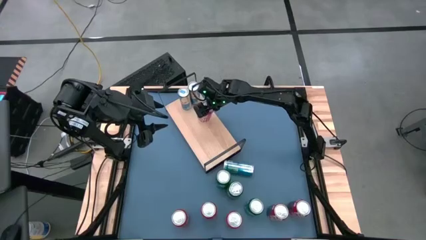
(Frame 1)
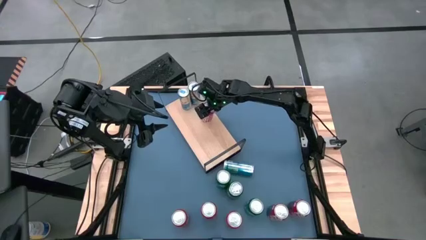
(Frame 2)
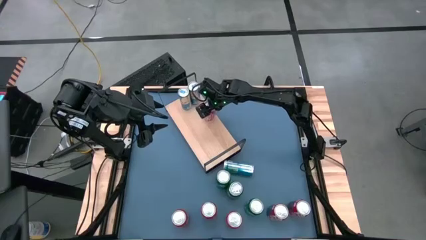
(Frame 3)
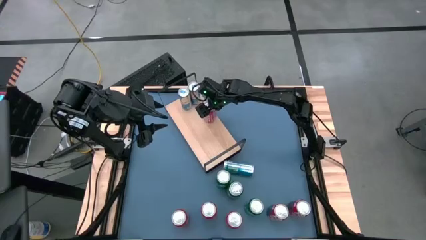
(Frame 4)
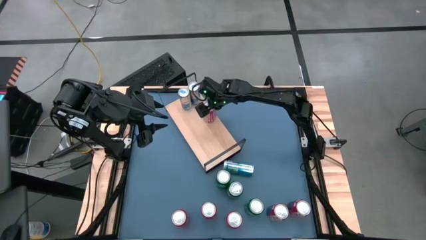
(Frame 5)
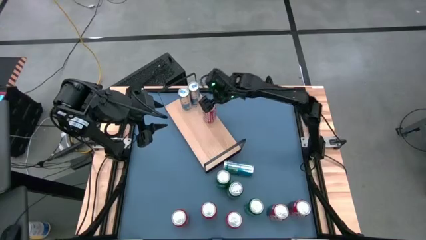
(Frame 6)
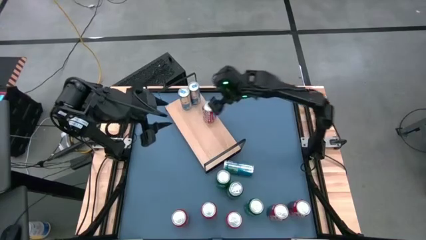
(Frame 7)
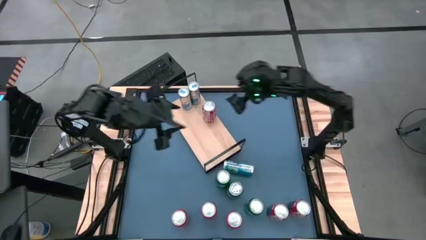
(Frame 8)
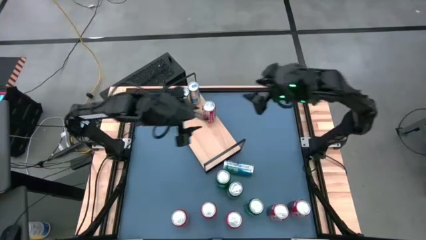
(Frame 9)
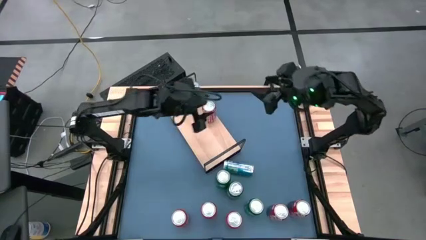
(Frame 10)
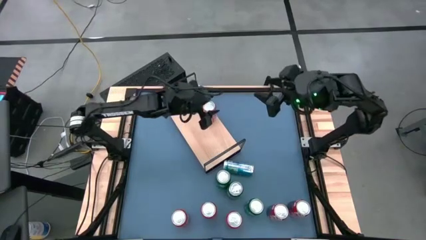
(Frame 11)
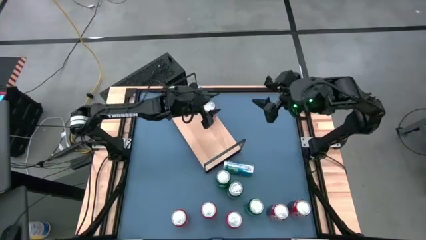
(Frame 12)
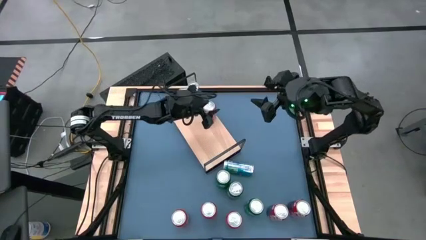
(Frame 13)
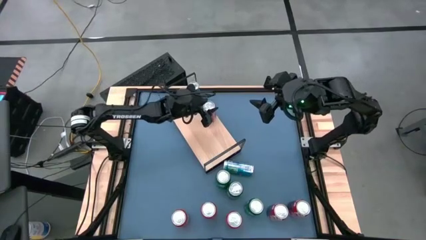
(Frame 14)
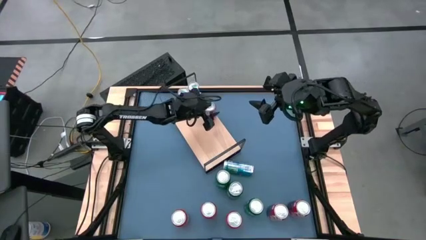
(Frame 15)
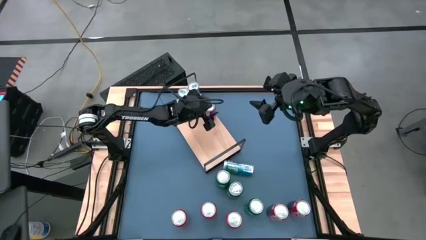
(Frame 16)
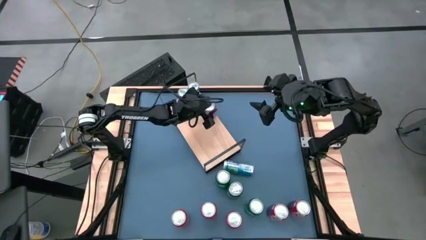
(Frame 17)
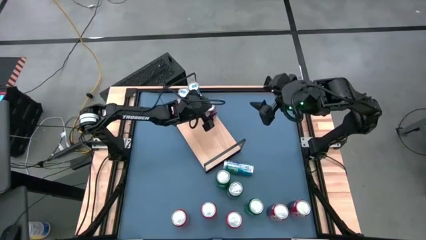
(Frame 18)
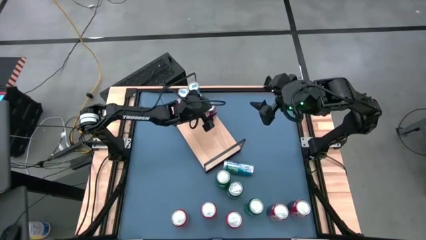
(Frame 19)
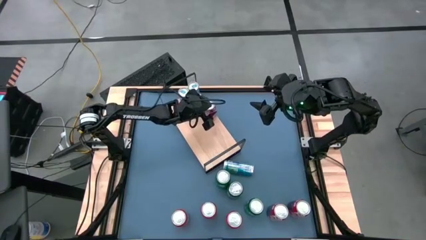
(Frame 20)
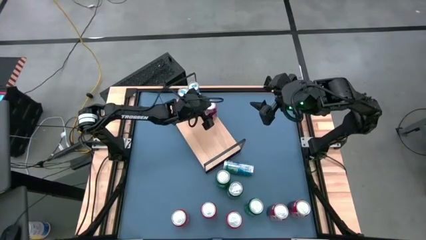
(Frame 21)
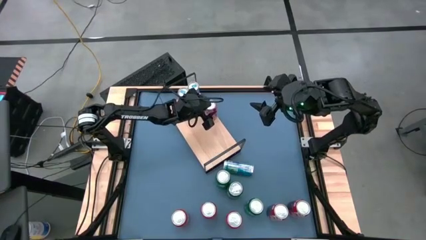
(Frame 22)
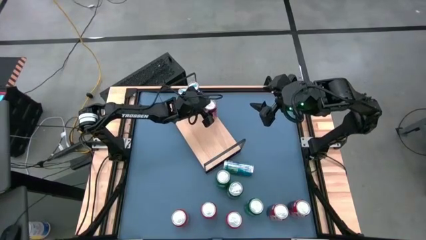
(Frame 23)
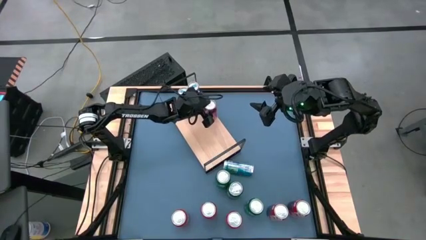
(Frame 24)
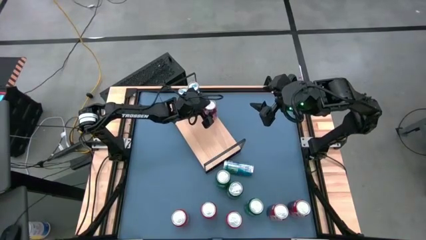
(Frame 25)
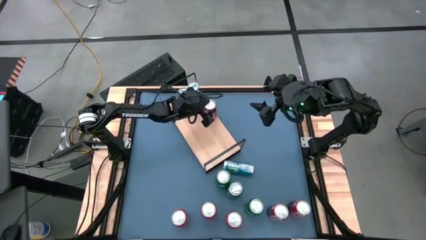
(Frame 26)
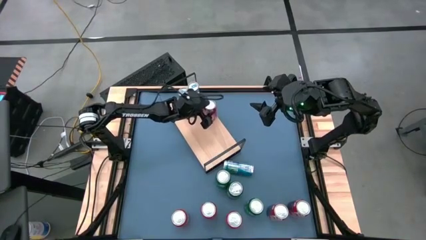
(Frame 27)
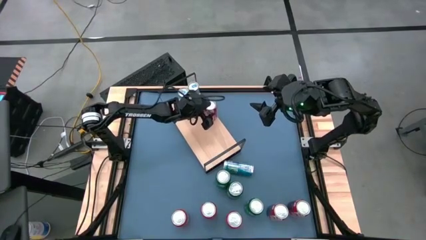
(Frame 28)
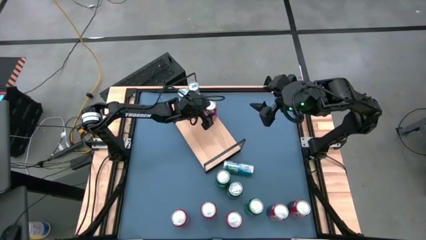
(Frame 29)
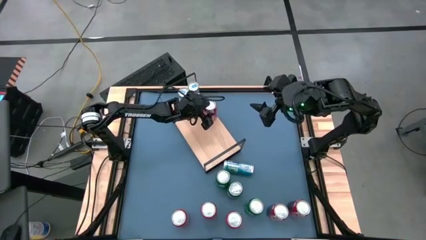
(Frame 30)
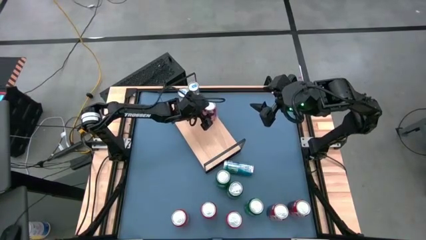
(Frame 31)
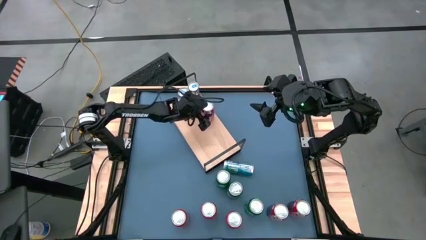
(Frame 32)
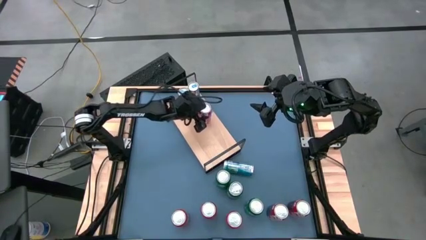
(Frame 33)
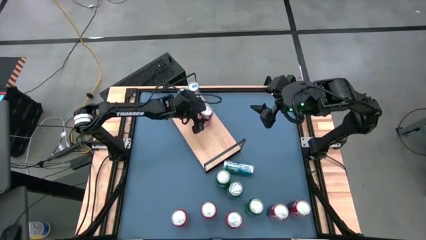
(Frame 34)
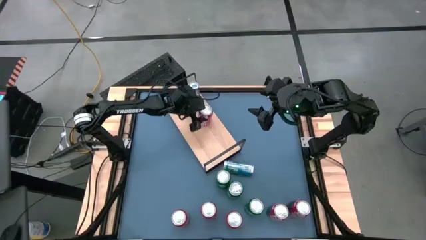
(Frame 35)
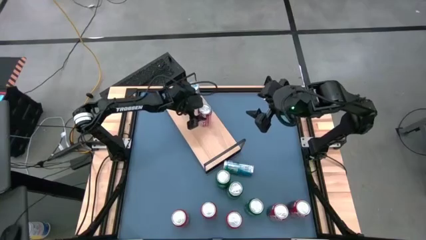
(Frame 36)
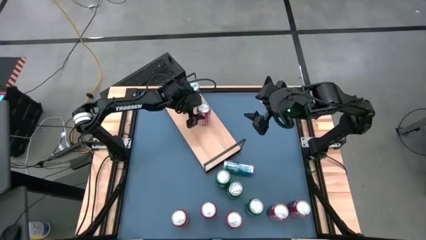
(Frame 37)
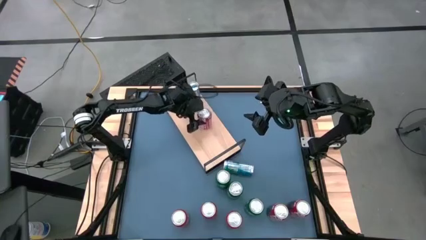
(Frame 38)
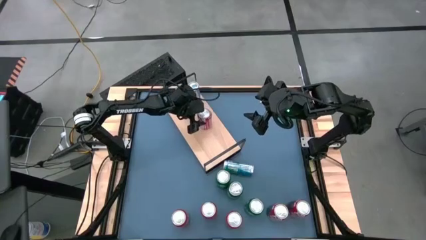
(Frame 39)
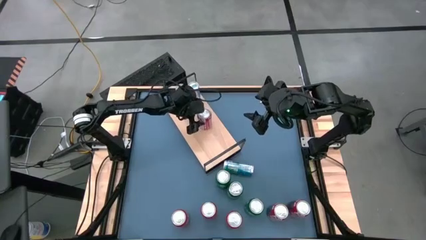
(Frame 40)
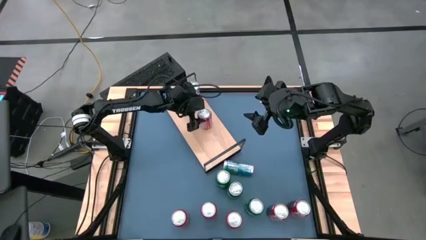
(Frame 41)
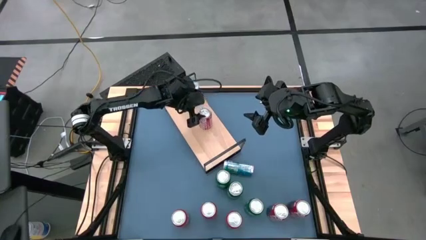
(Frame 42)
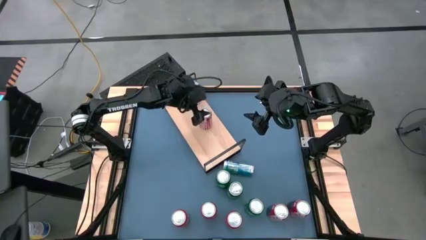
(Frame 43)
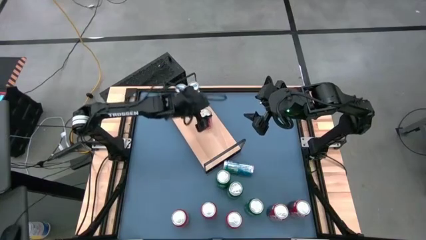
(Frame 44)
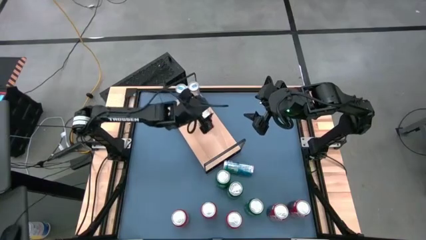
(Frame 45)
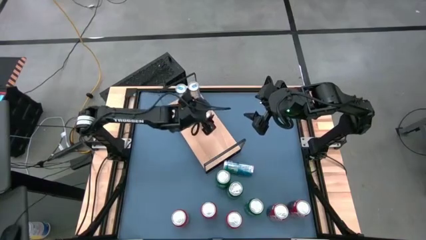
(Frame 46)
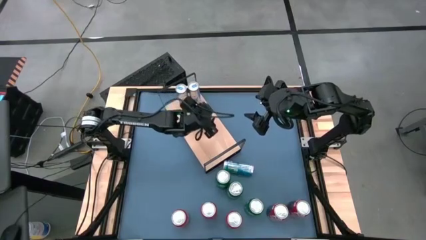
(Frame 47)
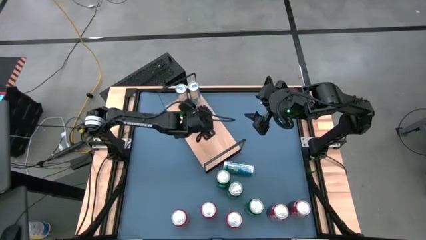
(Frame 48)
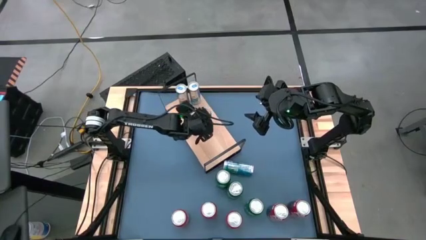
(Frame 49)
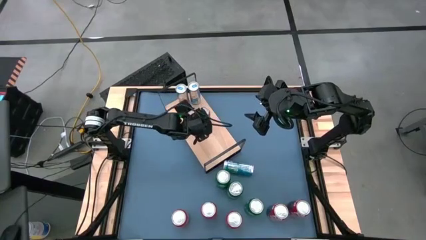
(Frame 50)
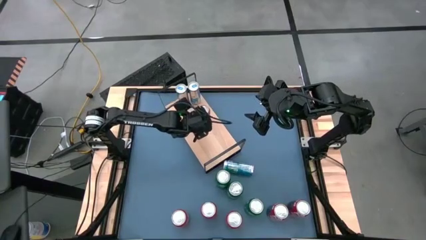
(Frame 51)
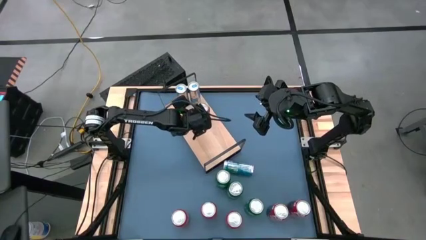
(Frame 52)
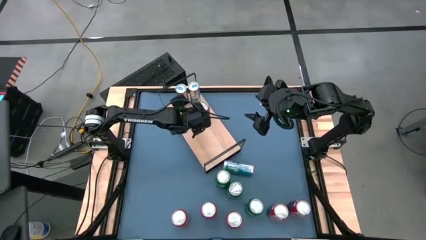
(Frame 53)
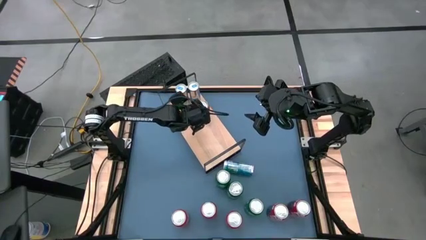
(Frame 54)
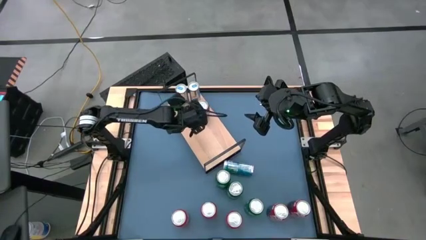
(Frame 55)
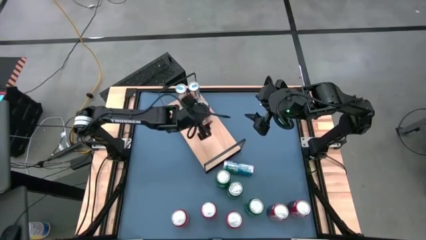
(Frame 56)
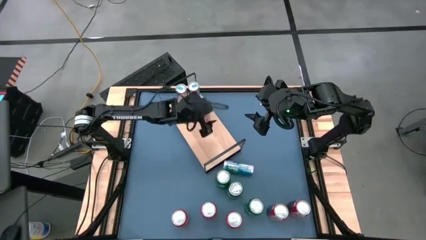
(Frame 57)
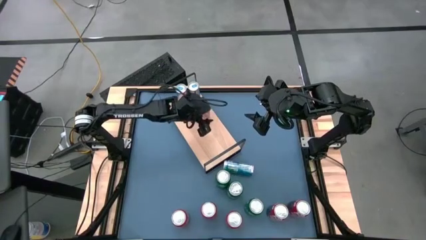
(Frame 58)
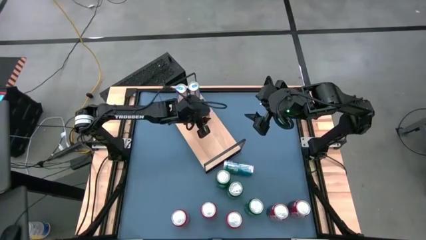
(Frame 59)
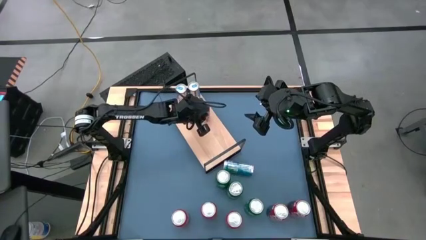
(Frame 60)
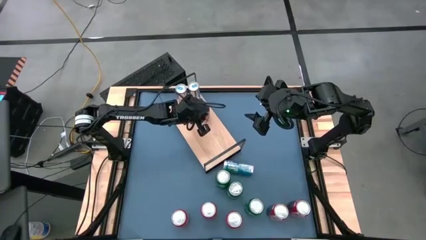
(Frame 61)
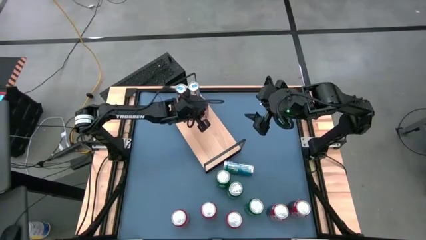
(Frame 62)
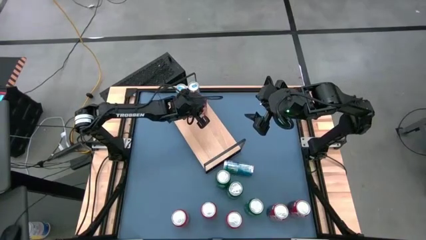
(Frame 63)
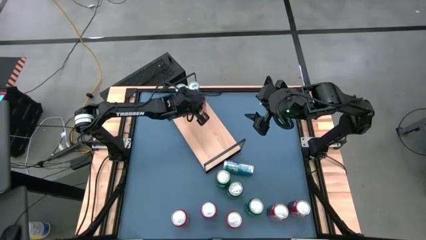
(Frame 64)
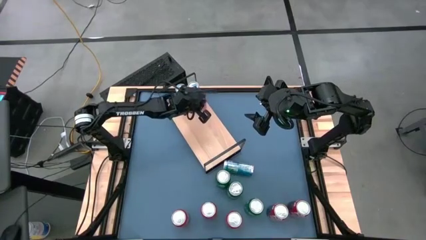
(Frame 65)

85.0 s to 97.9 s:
Task: Place canned beverage on shelf
Put the top left red white soda can on the shelf
